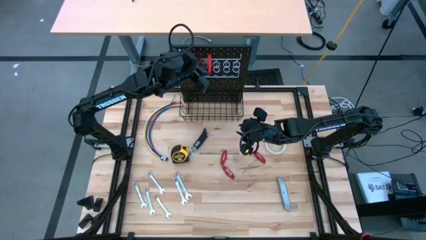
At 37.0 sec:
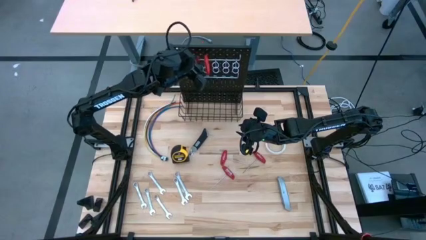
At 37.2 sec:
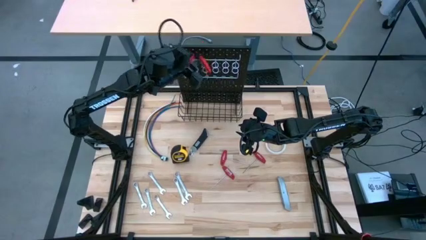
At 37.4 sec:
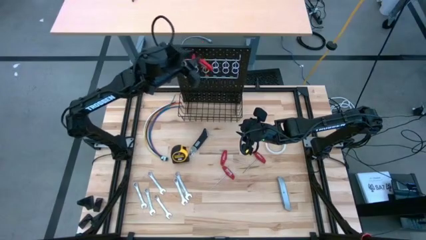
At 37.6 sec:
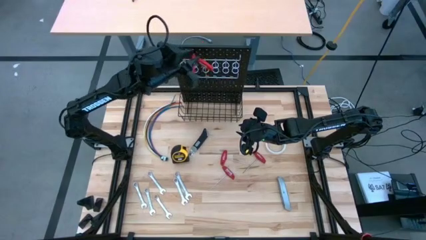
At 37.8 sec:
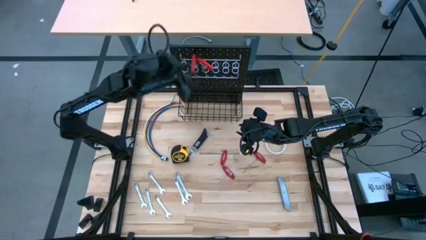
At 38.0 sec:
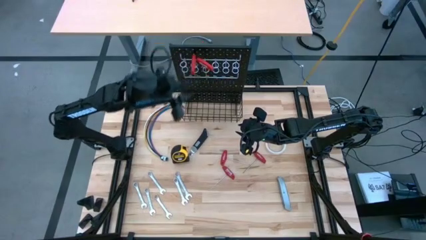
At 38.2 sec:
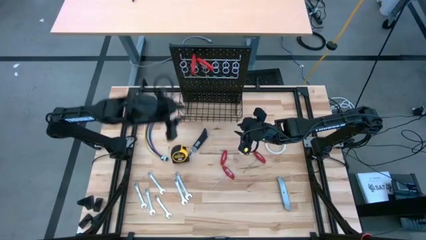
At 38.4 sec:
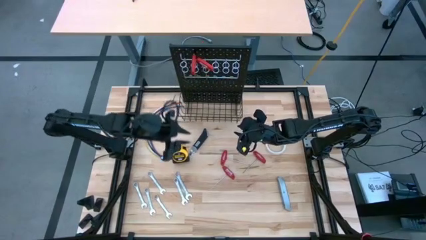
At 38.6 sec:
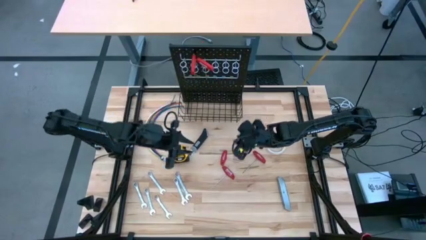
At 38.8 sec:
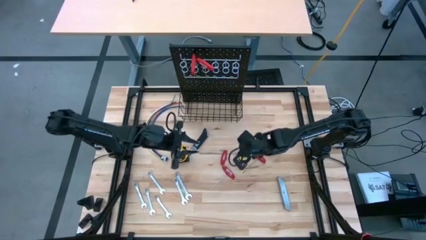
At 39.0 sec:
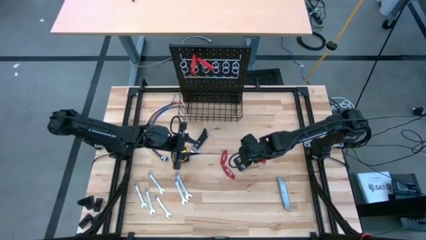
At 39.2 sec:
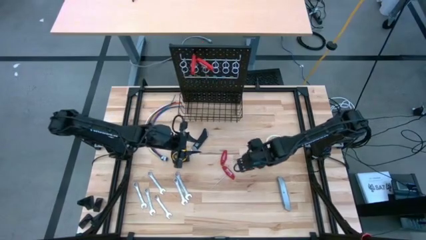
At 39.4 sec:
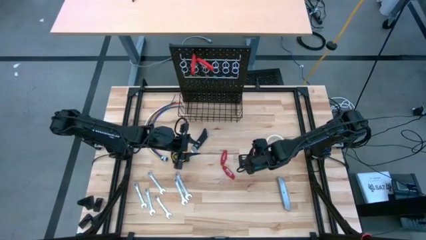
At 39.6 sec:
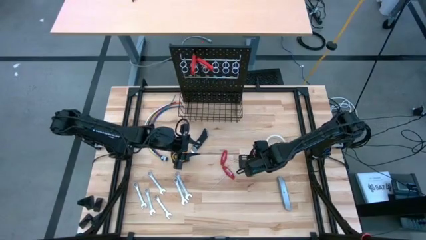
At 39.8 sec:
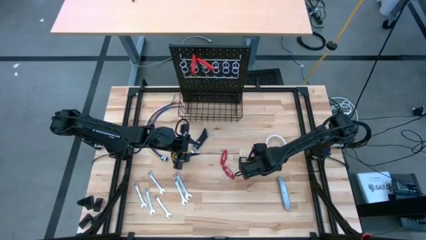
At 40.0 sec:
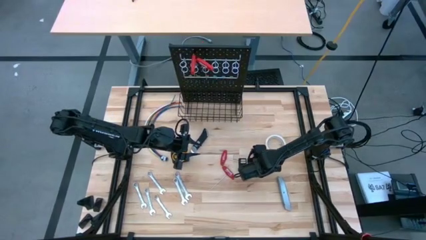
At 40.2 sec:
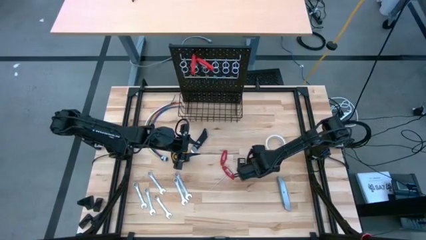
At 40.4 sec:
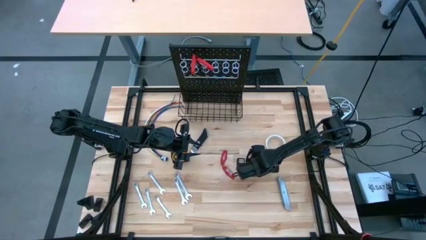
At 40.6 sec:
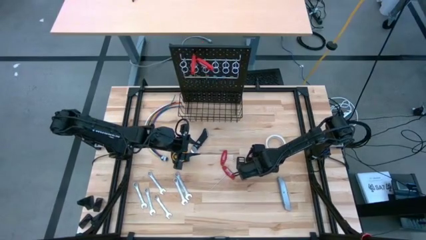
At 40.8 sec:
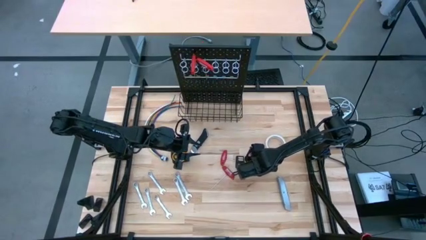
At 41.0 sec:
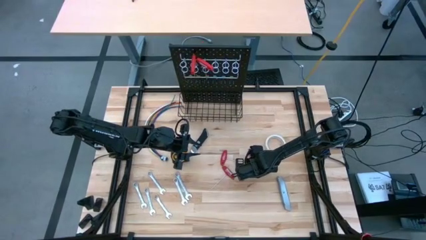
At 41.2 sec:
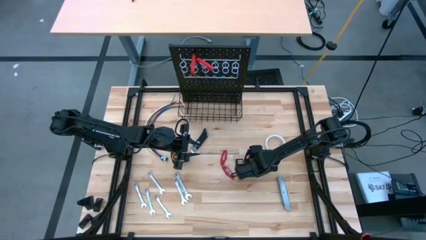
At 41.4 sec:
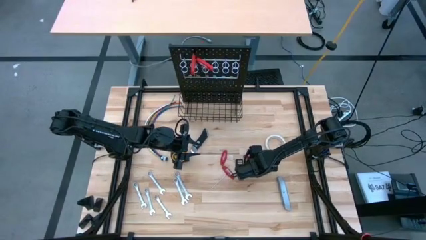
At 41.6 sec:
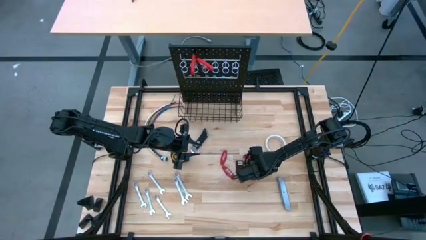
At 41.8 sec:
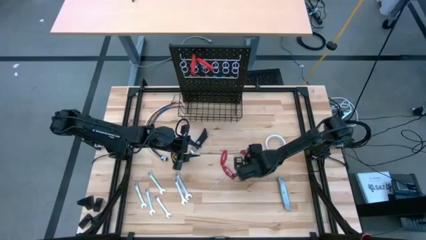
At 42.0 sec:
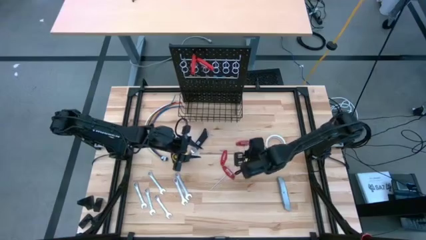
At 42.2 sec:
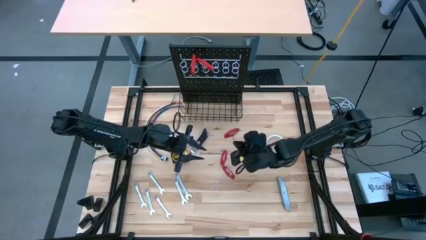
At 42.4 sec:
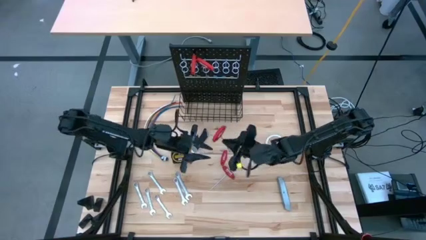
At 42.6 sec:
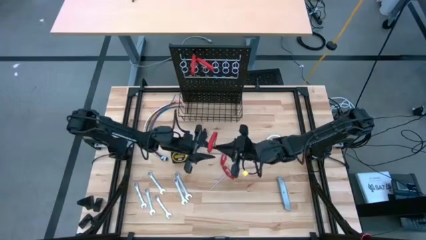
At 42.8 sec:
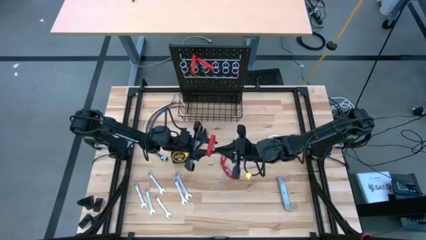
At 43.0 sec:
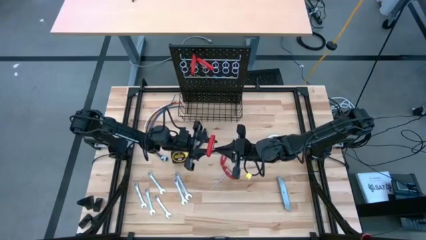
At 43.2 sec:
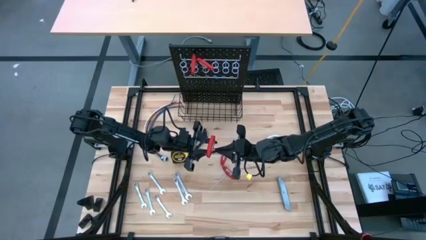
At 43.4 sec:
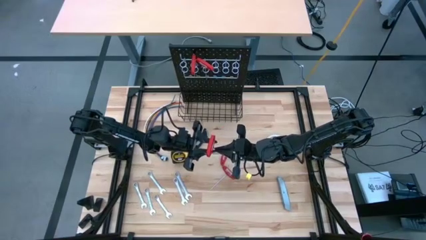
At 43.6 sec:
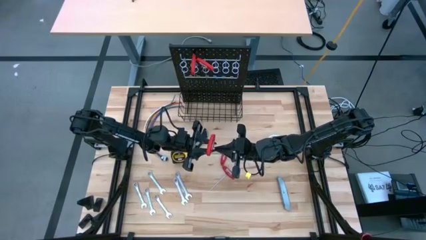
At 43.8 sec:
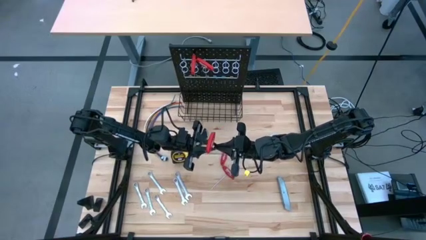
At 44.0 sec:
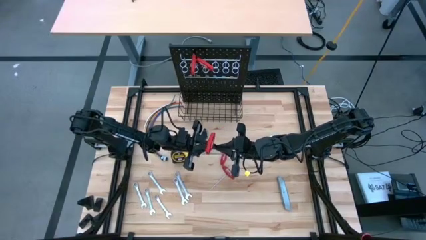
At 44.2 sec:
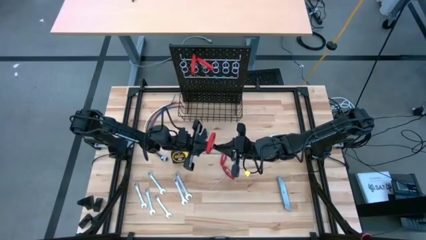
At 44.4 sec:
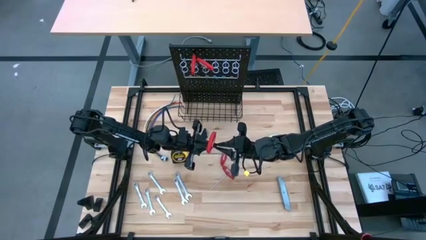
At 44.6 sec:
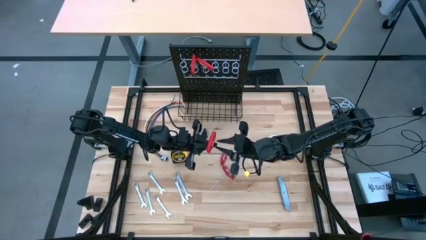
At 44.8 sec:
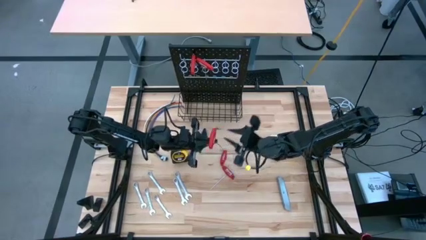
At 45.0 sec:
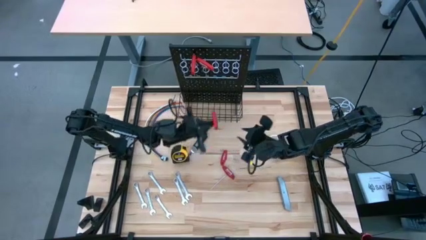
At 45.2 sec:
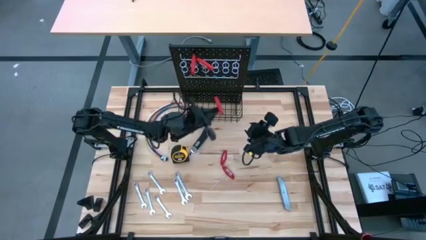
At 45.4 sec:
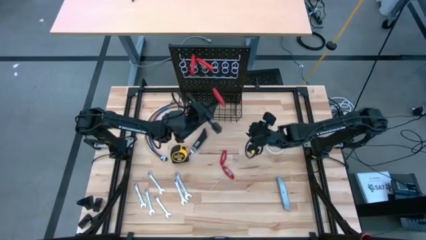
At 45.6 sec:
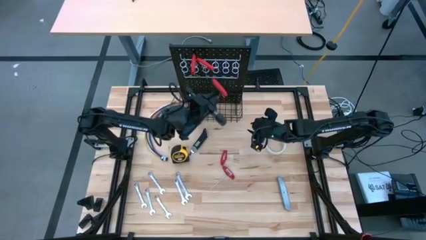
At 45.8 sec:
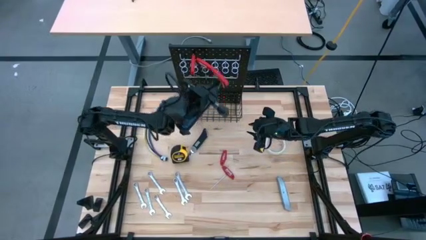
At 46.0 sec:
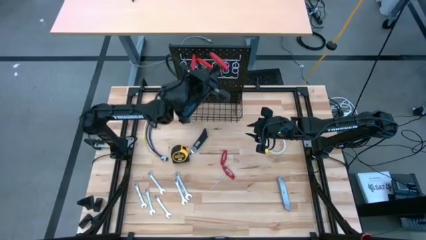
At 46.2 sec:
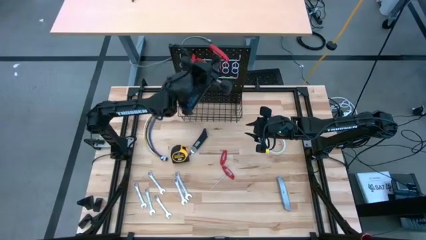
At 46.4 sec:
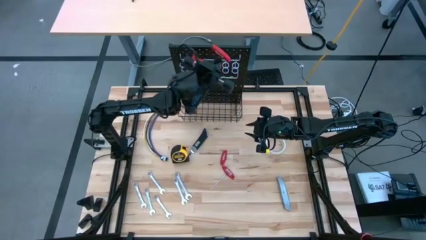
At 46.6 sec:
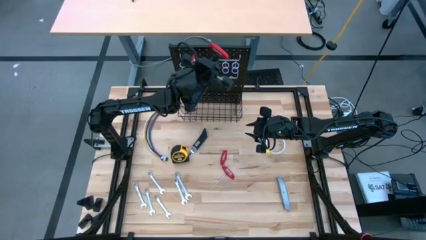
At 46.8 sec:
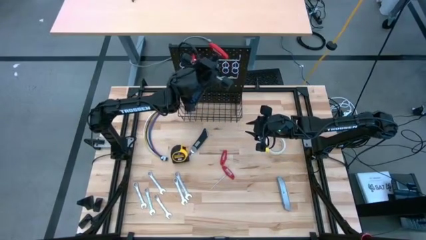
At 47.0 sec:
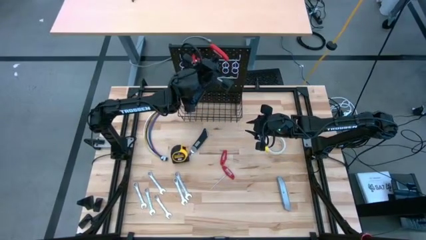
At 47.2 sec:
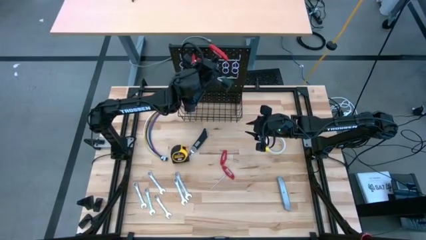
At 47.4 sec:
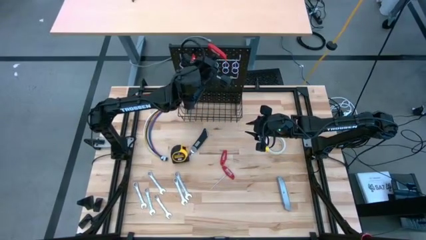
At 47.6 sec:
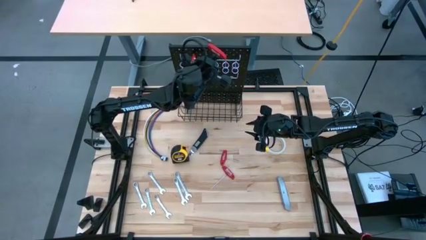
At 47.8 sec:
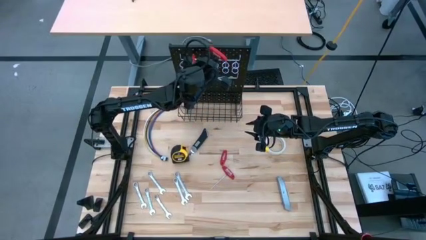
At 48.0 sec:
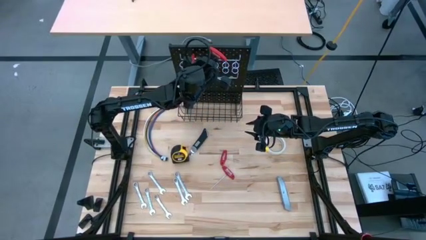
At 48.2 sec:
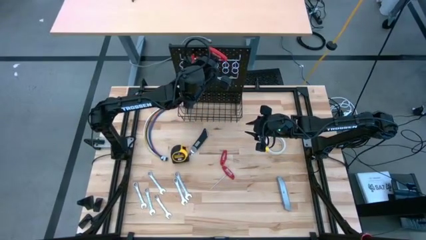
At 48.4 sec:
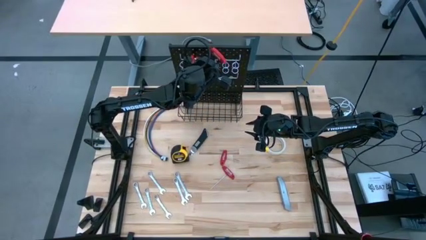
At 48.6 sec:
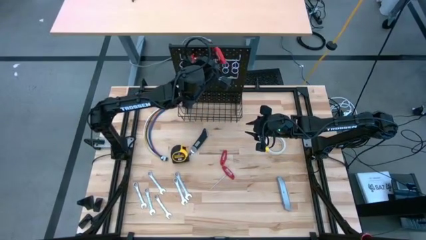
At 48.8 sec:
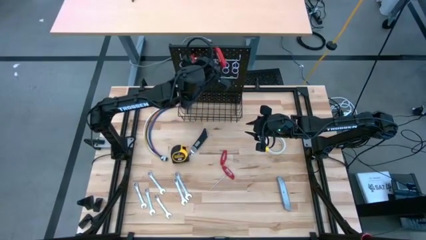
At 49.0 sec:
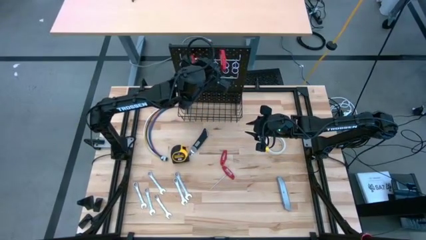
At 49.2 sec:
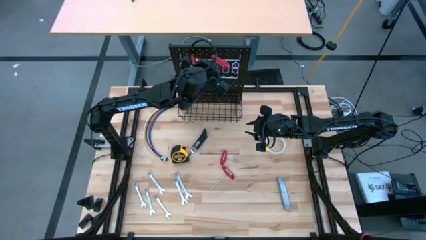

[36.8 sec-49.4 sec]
Task: Hang tools onto peg board
Hang the top right allen wrench on the peg board

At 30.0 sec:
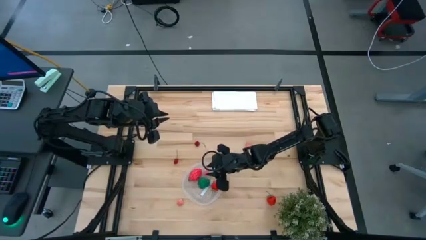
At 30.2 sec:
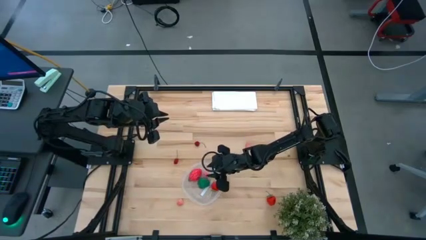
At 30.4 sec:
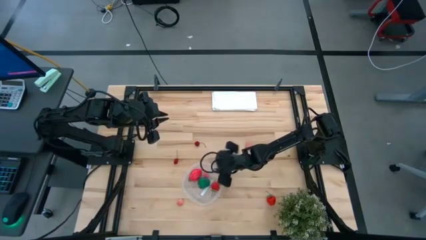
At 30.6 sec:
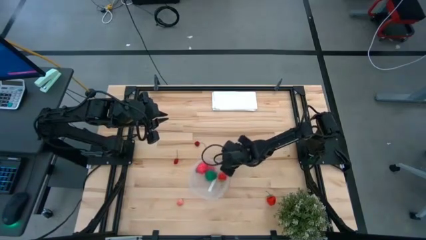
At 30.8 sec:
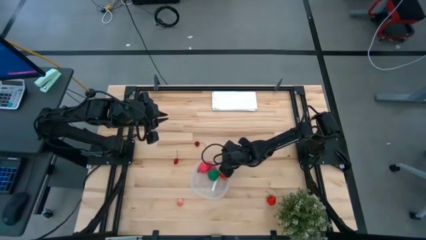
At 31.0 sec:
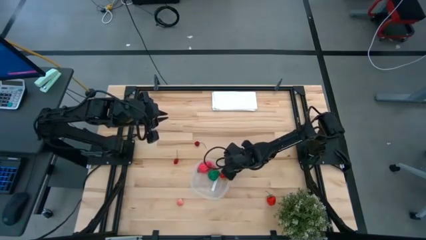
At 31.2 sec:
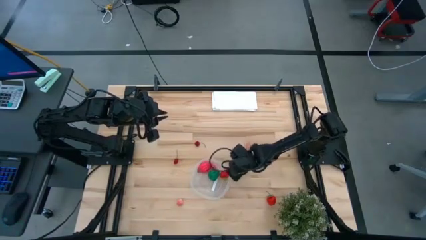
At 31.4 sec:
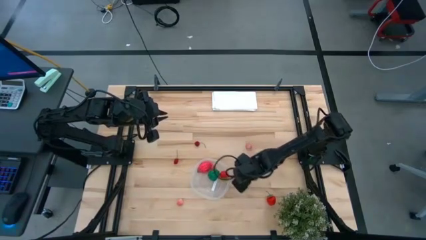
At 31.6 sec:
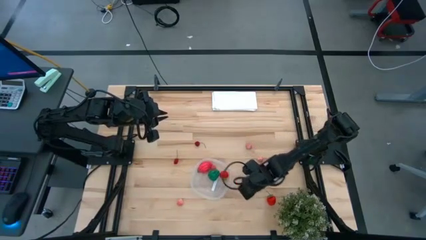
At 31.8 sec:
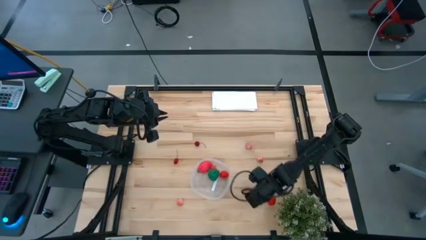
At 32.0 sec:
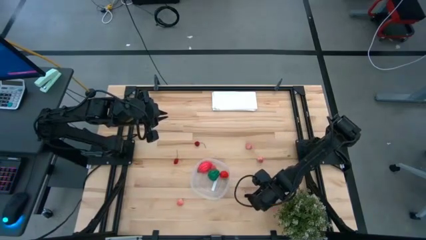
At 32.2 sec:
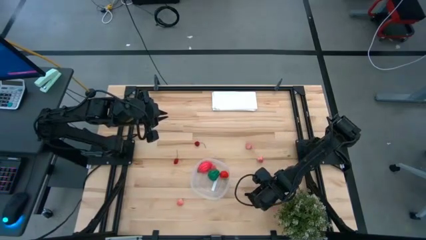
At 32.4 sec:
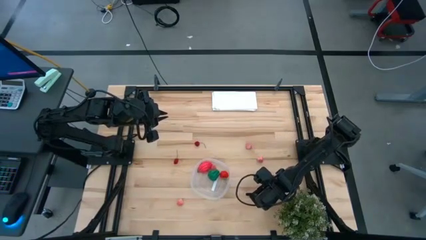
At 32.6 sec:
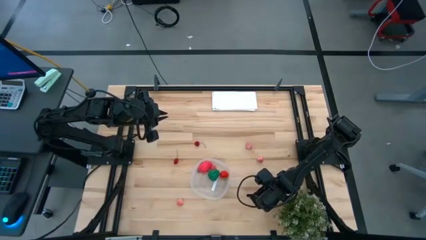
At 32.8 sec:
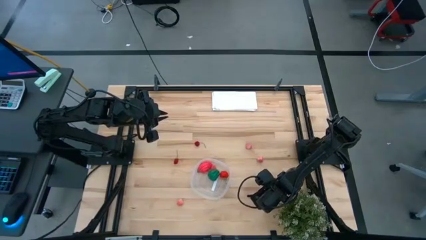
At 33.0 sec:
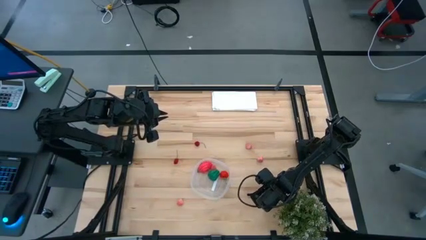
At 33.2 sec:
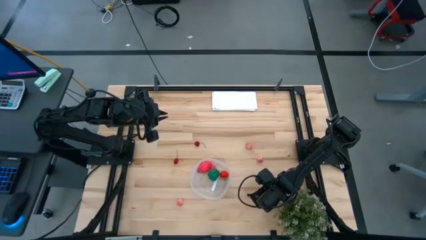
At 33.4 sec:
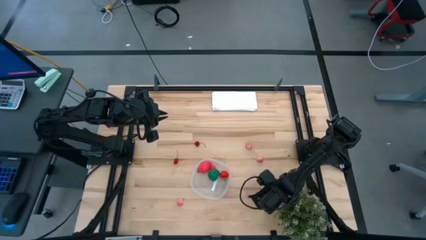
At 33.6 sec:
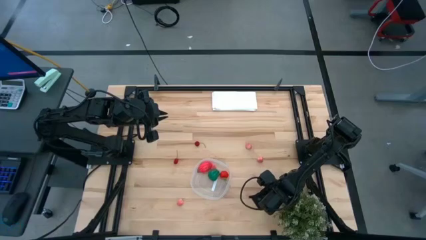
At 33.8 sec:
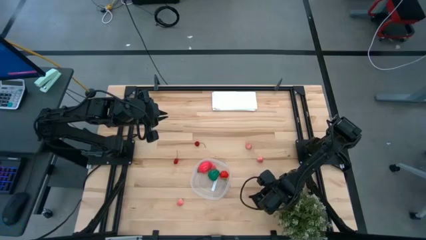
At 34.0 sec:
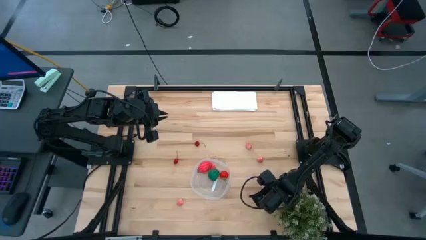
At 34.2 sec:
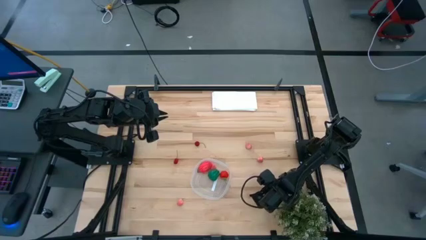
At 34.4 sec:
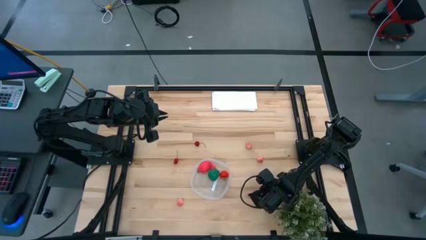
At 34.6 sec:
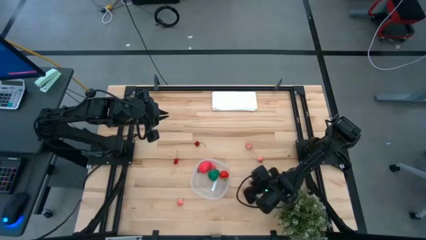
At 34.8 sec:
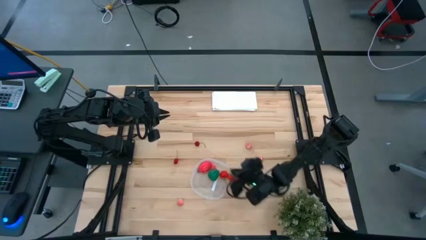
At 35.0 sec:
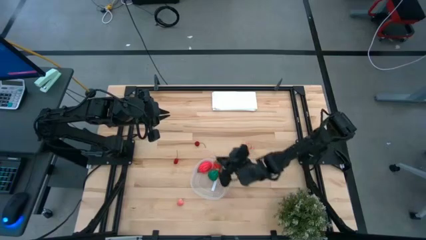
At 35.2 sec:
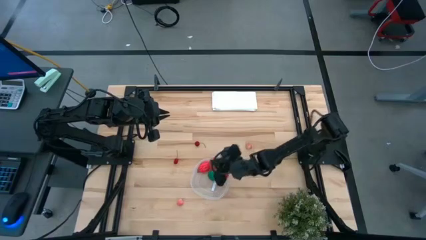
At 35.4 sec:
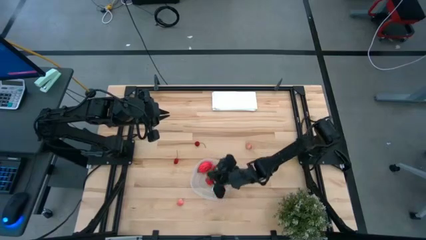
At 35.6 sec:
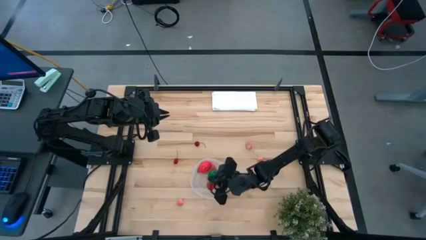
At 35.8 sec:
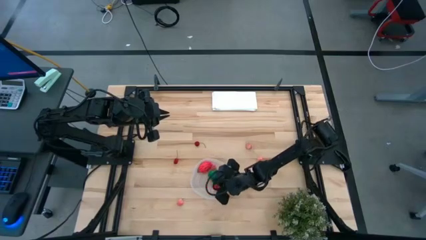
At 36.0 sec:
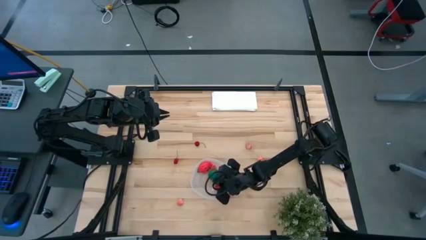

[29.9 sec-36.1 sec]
Task: Pick and placing Produce into tupperware
Put the red strawberry into the transparent bin
